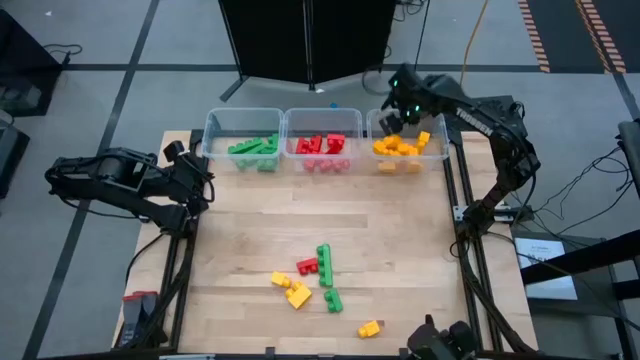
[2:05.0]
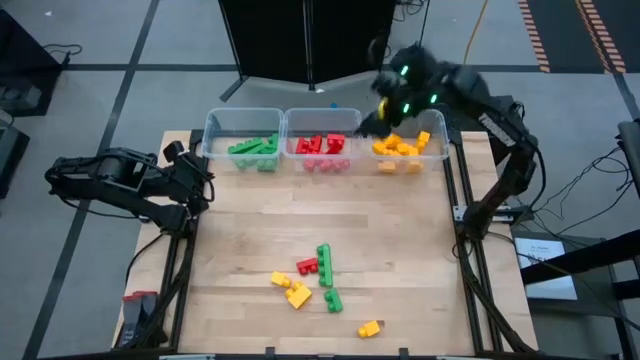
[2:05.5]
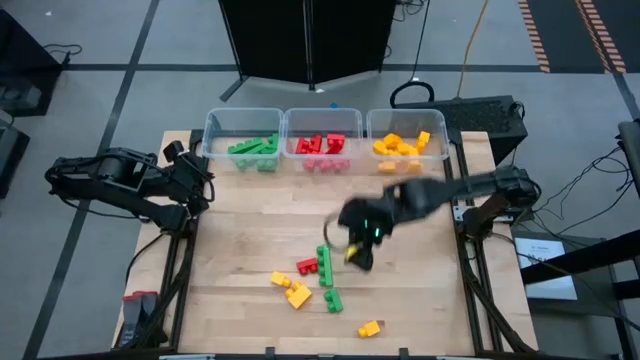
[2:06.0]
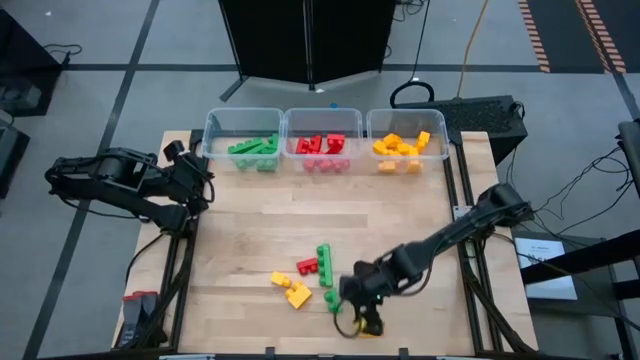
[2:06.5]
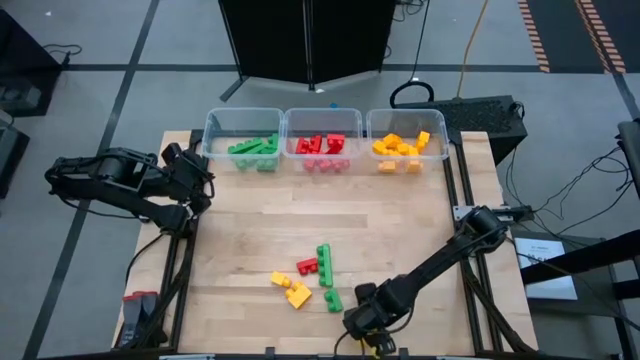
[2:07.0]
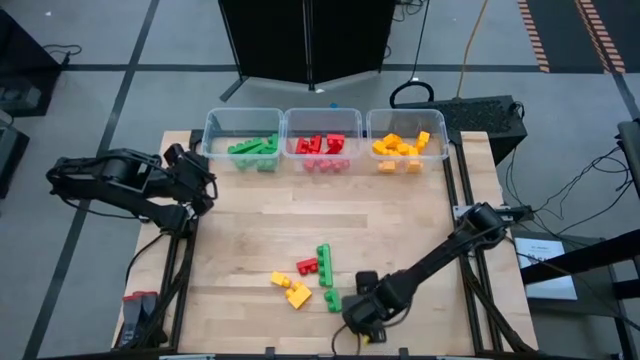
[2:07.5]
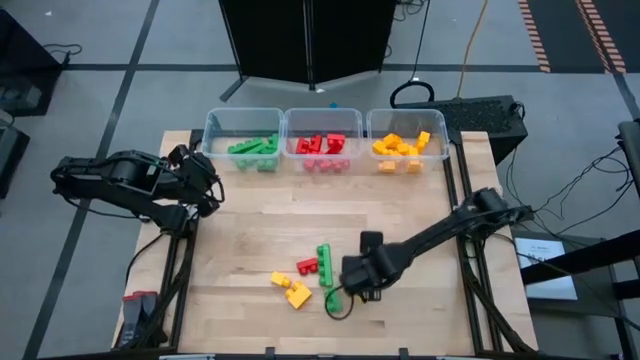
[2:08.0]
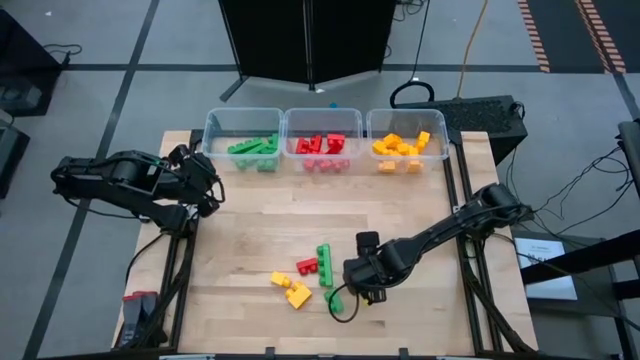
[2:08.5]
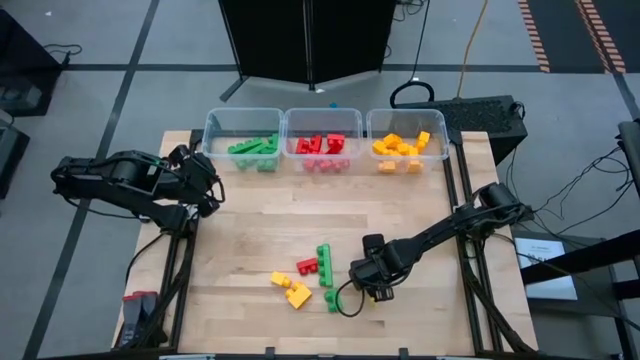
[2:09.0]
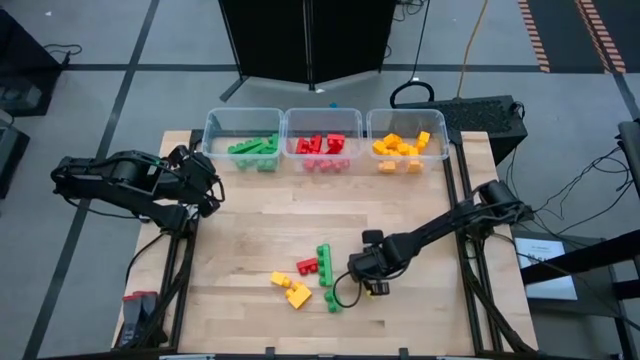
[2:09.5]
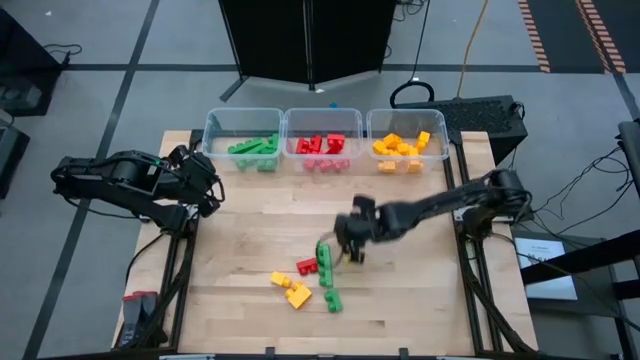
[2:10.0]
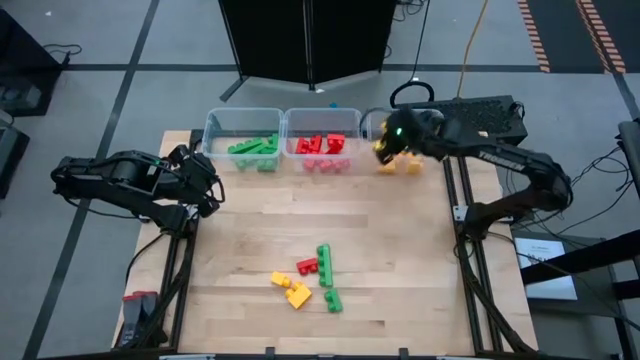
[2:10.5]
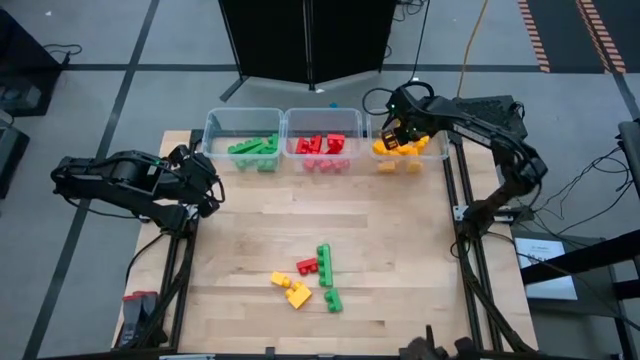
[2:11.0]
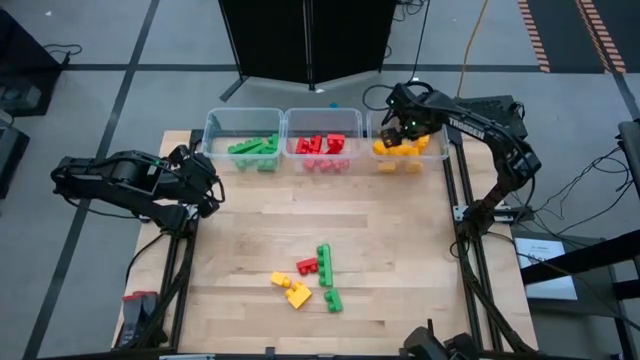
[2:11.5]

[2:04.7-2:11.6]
Task: Sort blocks
Put the yellow game piece with 1 stud into the right transparent bin

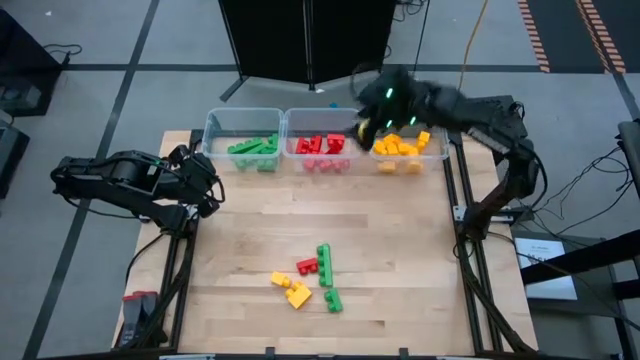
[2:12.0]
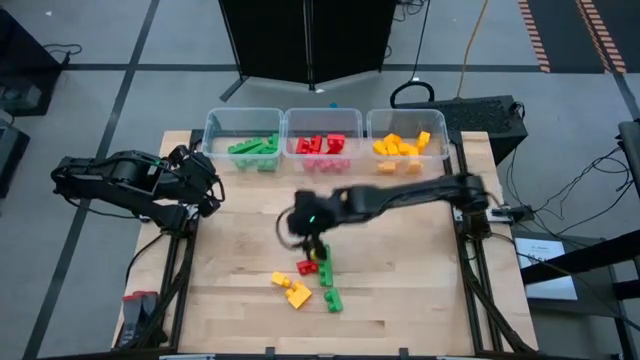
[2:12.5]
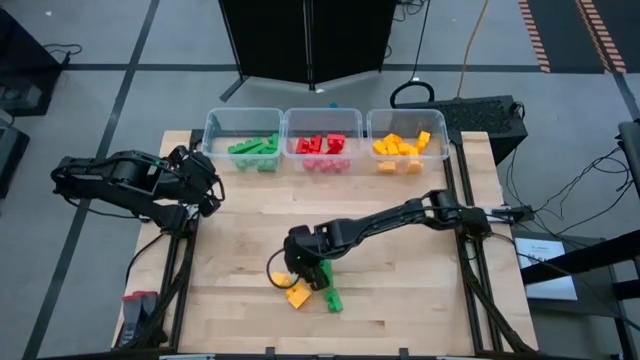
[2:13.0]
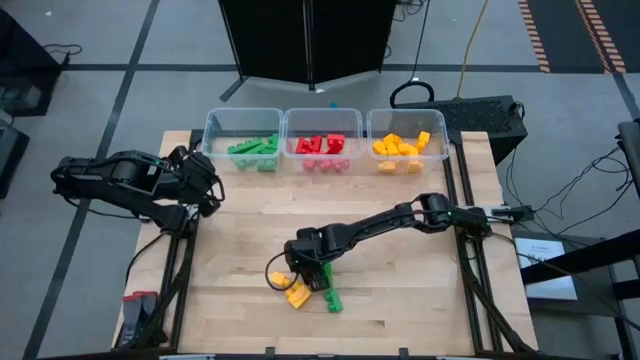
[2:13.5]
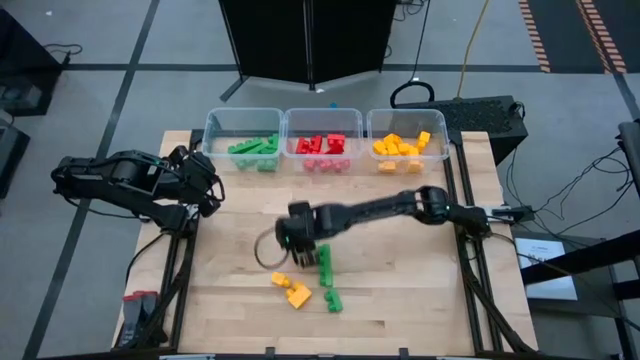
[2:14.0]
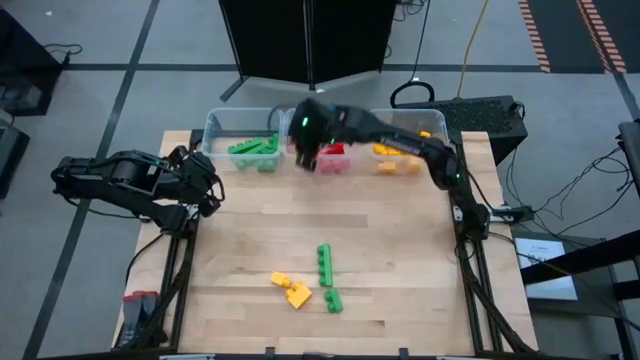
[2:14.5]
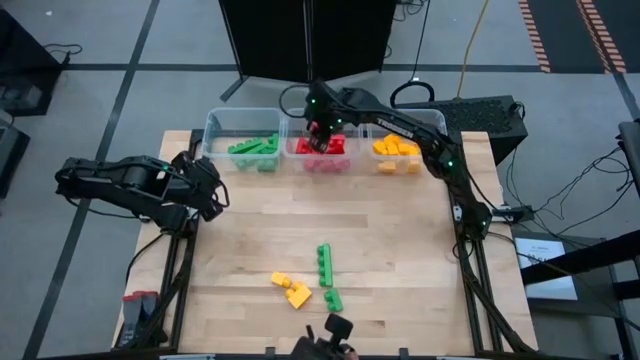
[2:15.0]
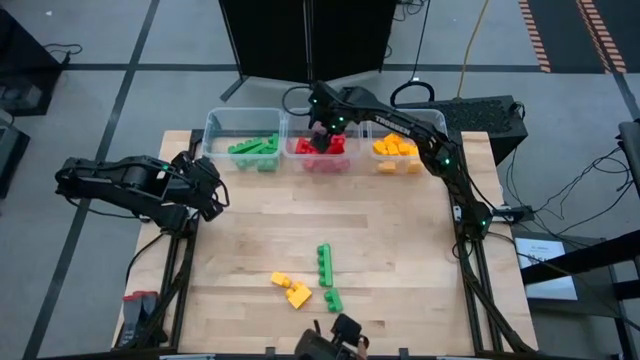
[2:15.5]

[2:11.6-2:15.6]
Put the red game piece with 2 studs into the center transparent bin

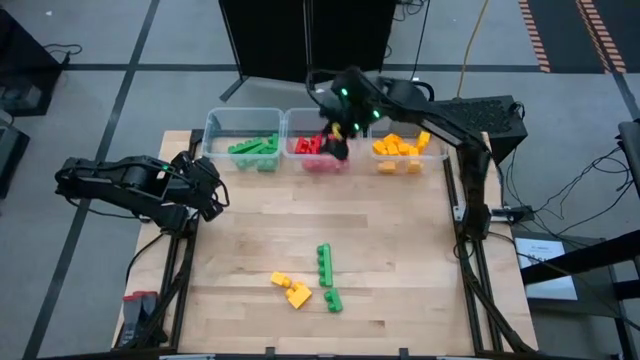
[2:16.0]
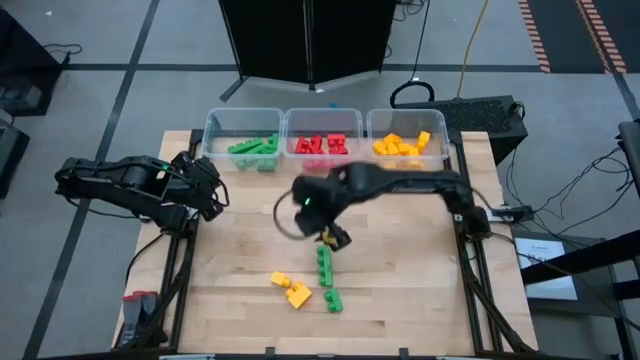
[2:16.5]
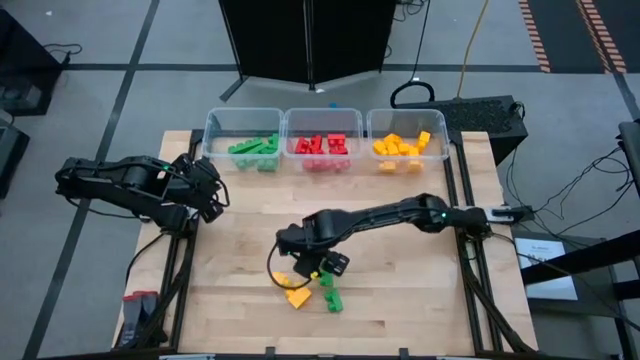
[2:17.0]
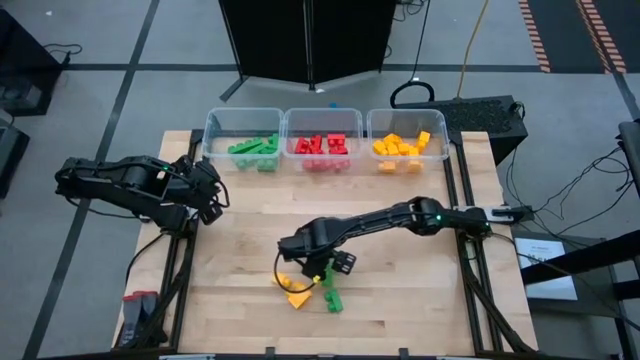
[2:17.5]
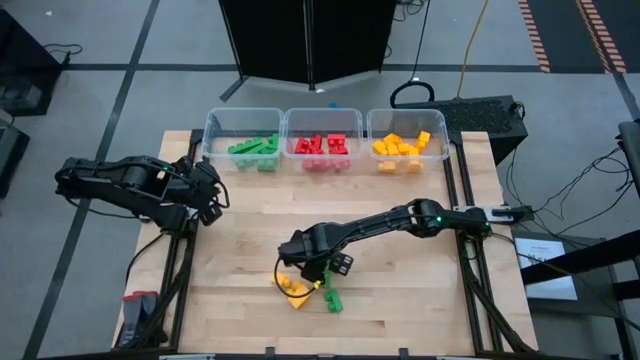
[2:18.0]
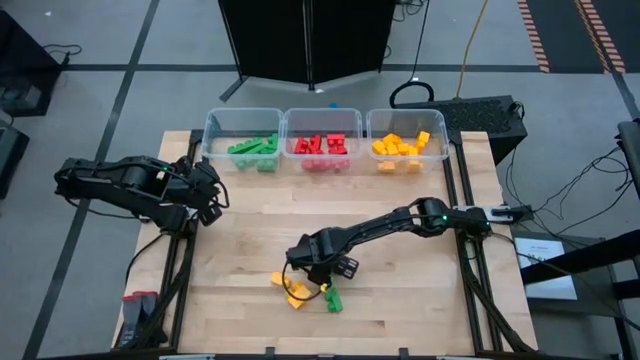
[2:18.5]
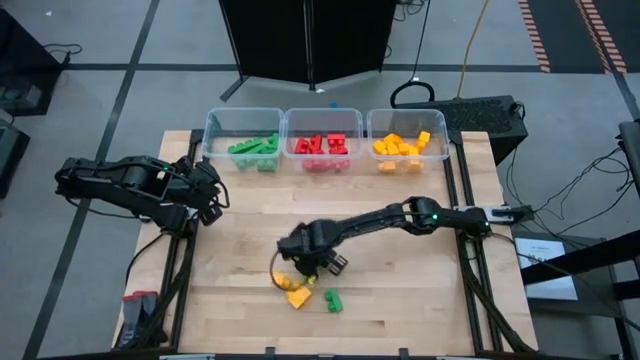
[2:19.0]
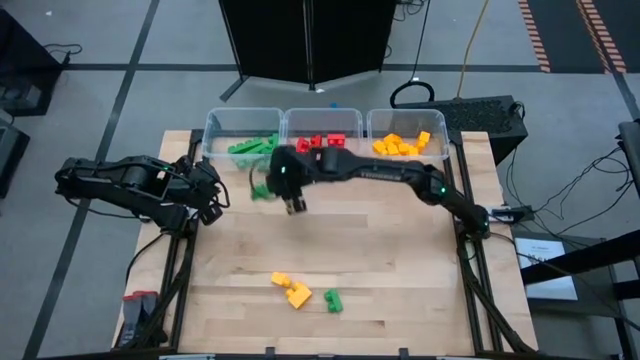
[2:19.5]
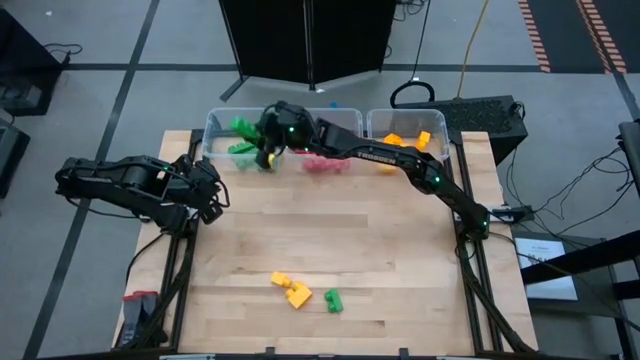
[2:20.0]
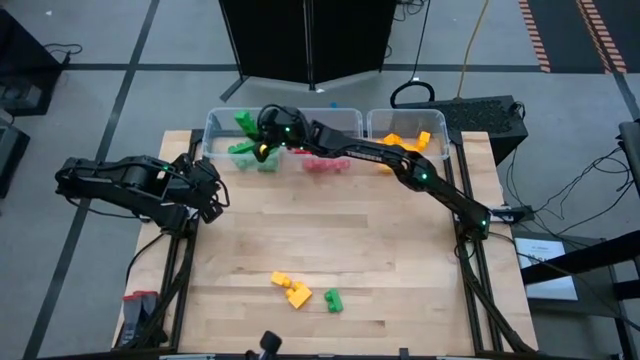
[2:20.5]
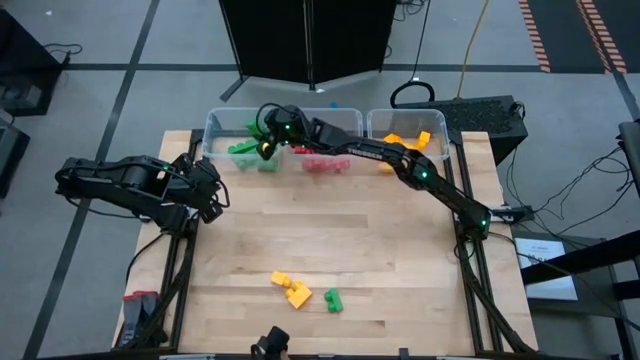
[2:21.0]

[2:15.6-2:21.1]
Put the green game piece with 4 studs into the left transparent bin

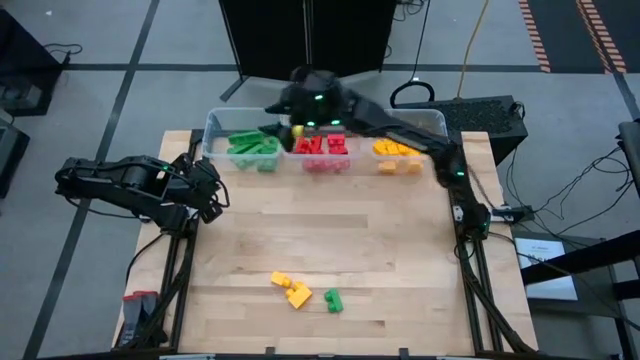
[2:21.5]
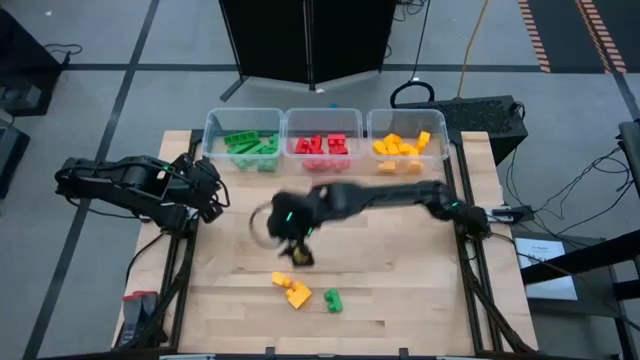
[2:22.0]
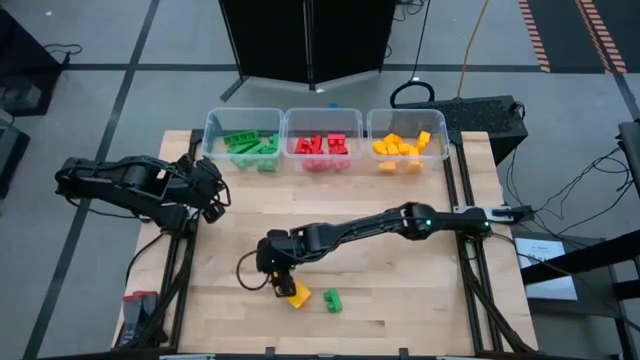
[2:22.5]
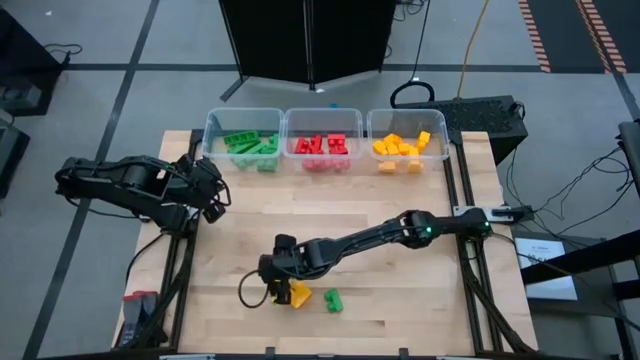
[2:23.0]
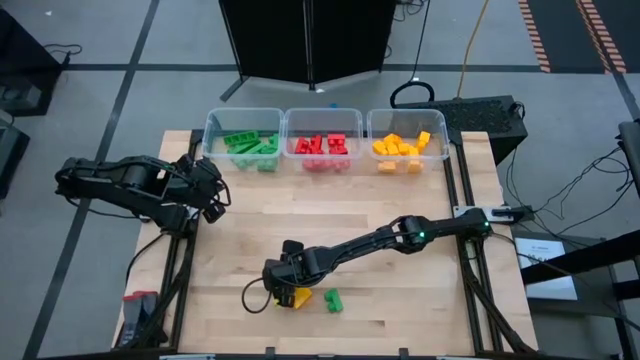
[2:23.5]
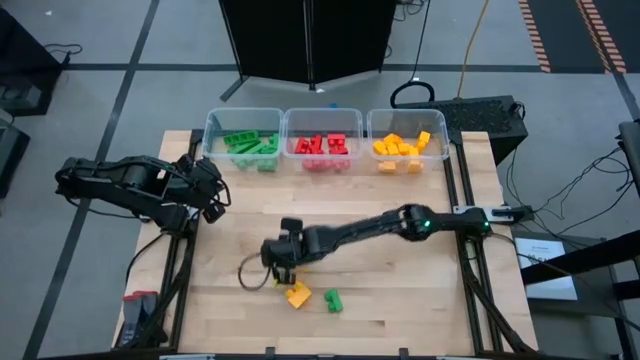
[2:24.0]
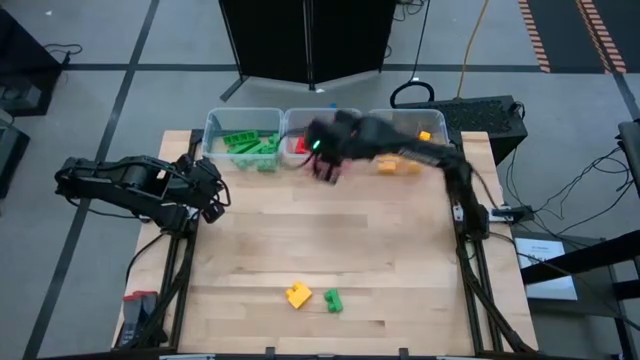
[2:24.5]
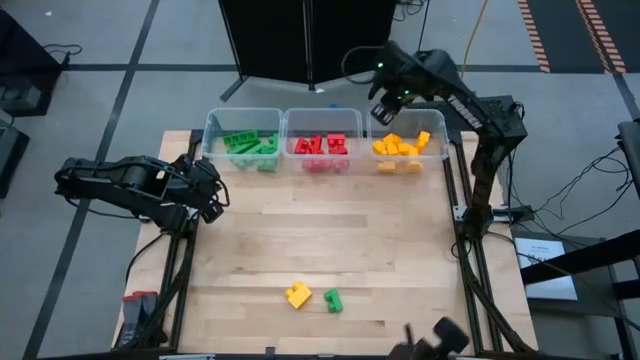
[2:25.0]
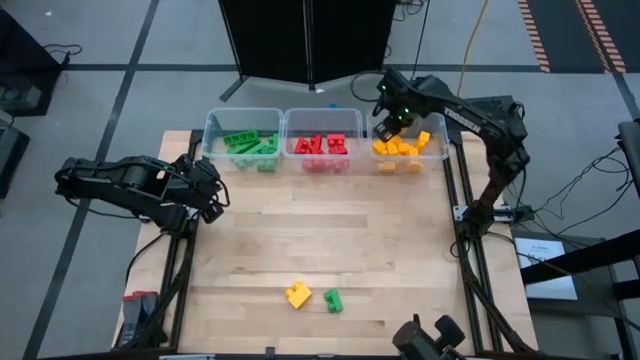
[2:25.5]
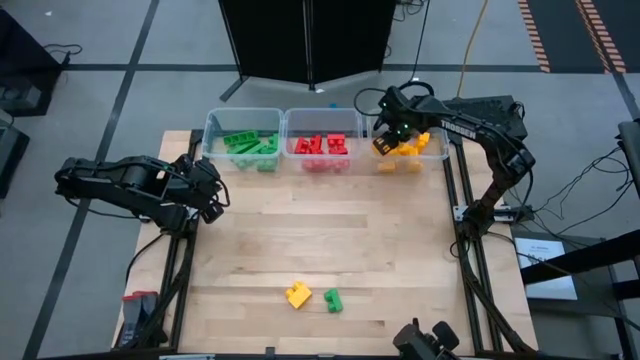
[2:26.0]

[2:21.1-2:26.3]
Put the top yellow game piece into the right transparent bin
